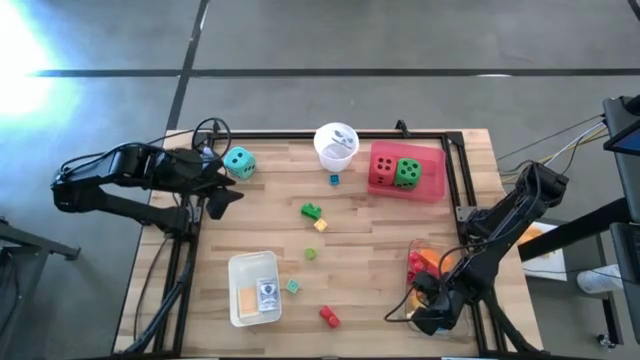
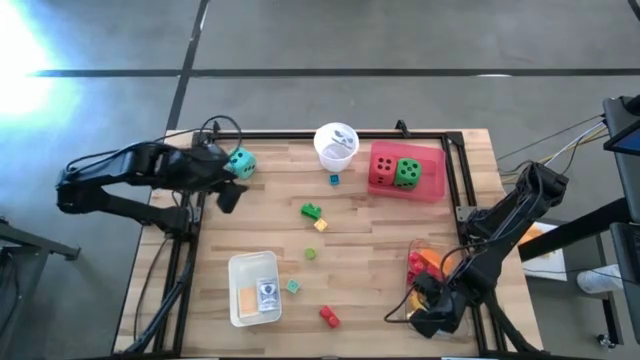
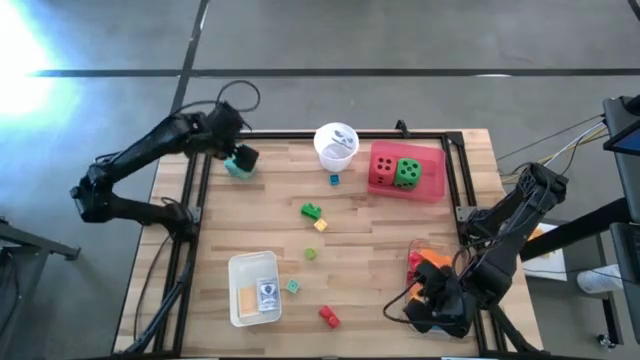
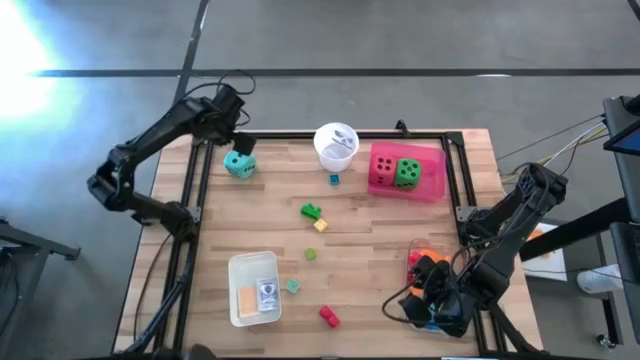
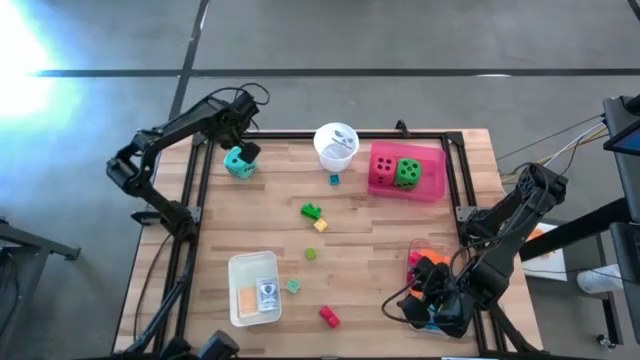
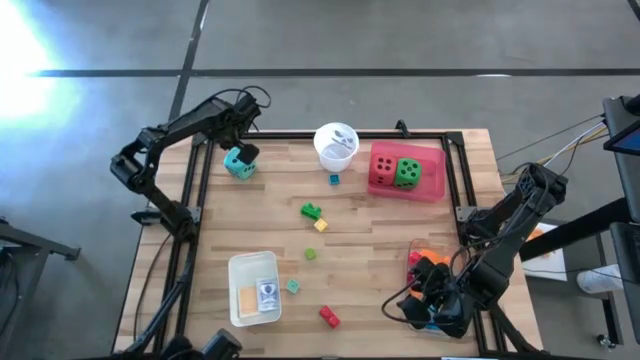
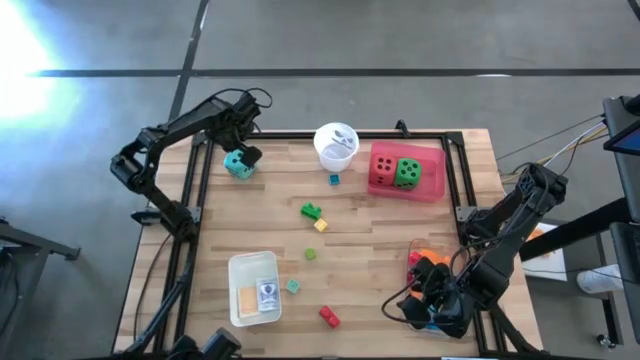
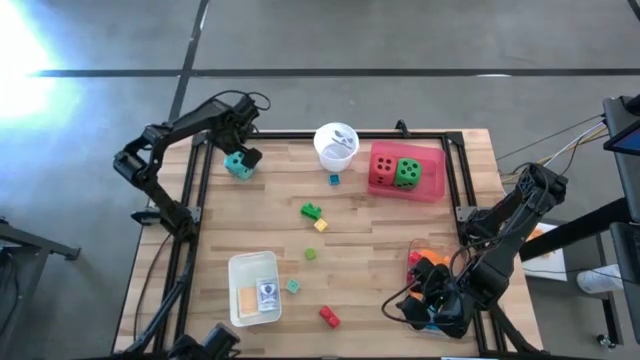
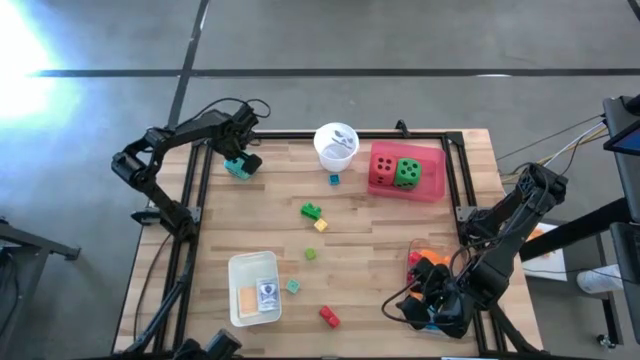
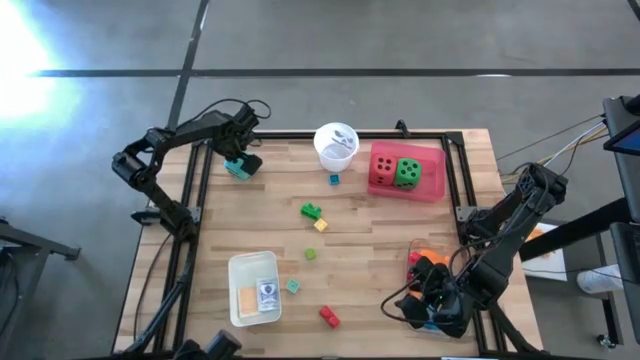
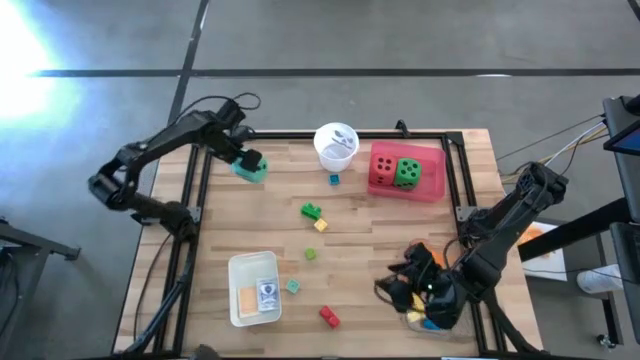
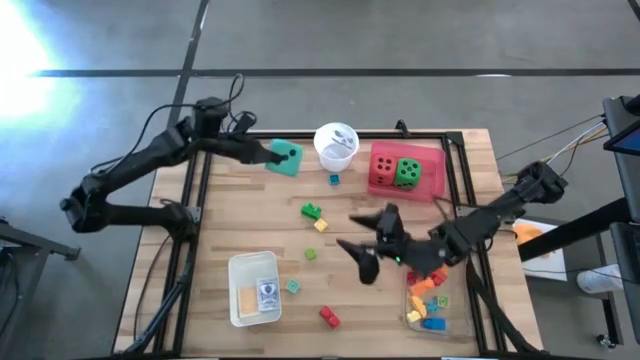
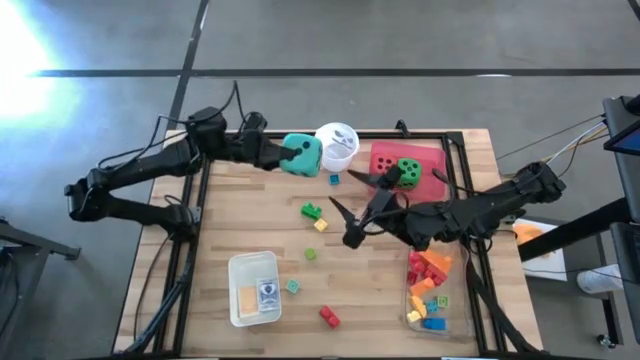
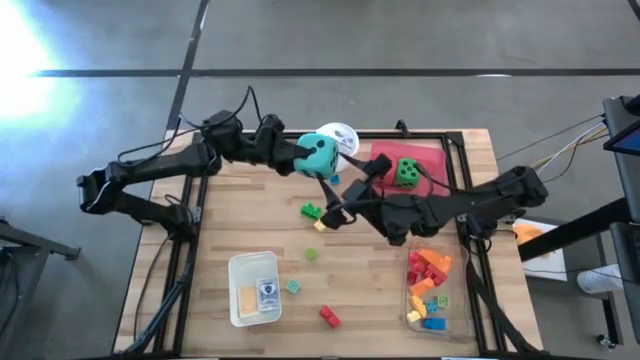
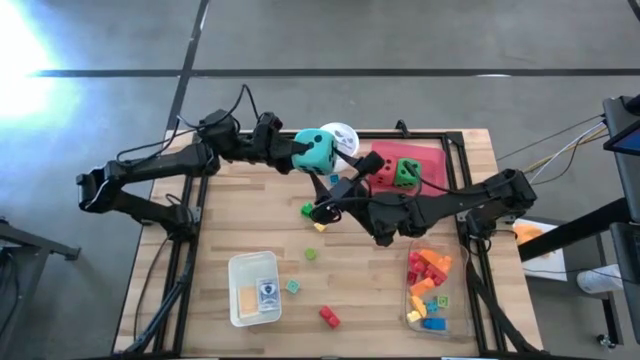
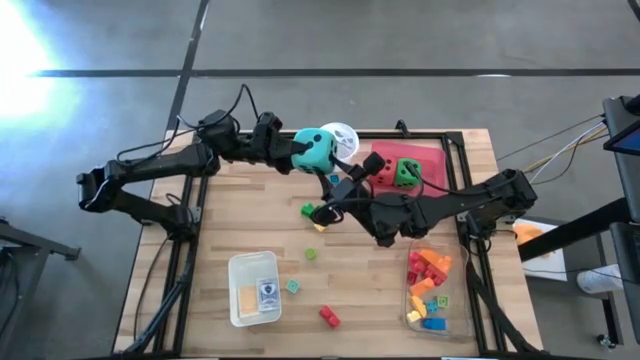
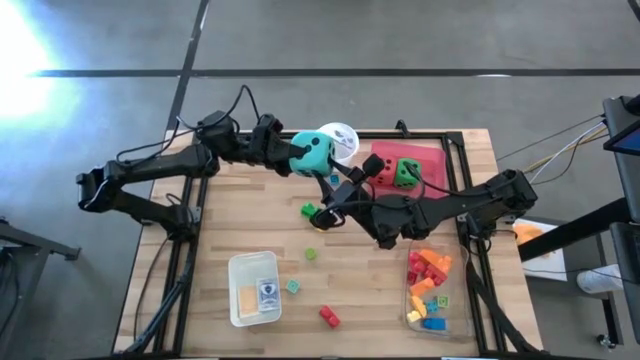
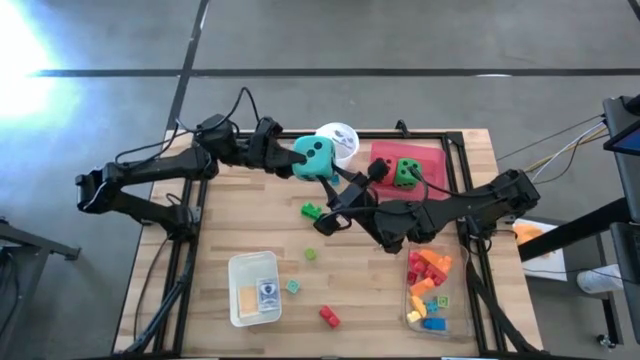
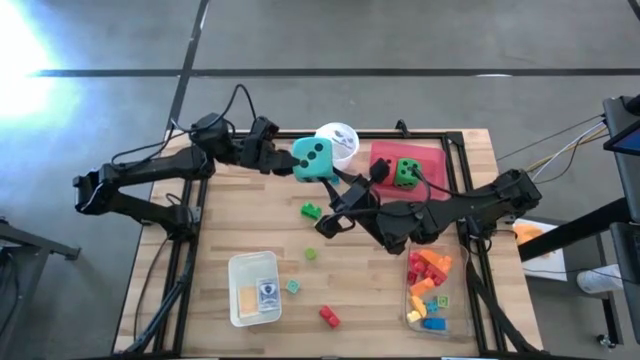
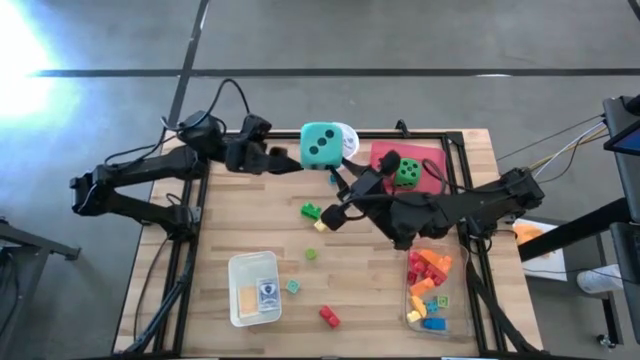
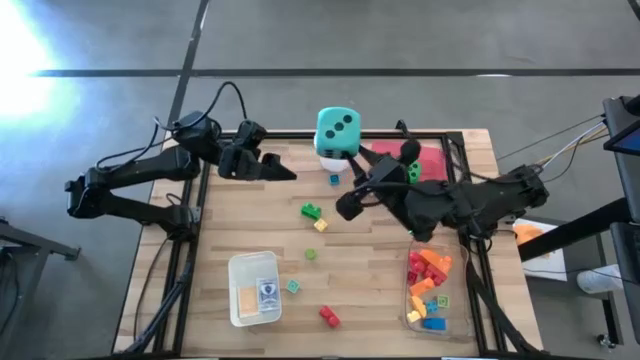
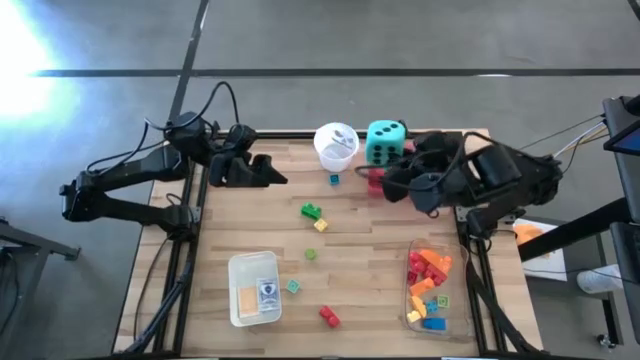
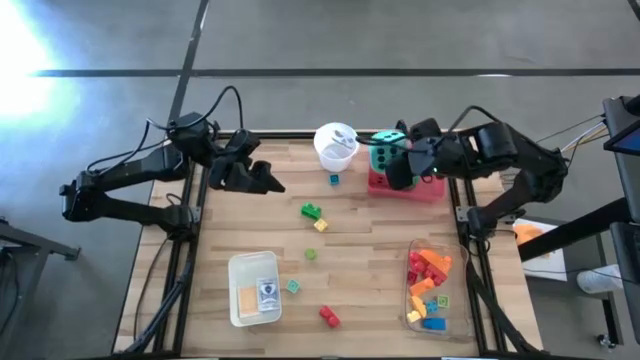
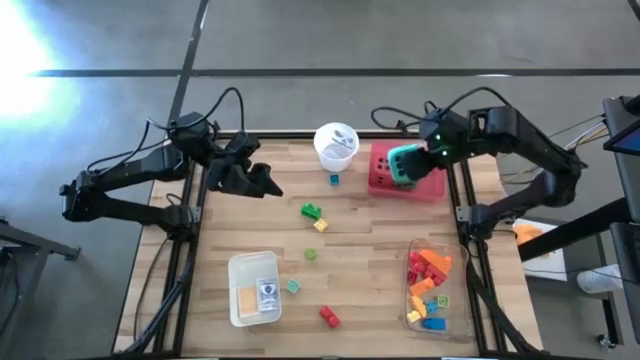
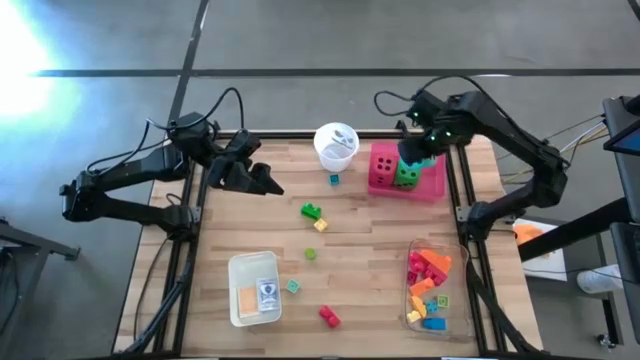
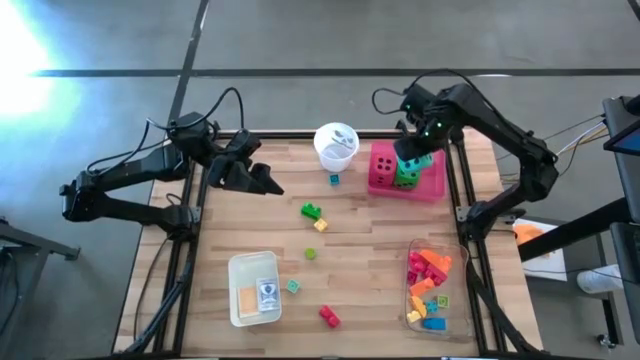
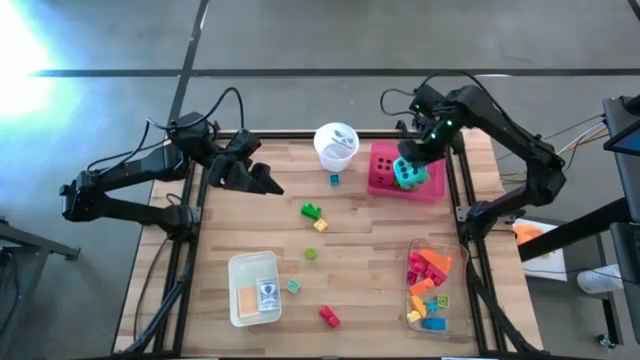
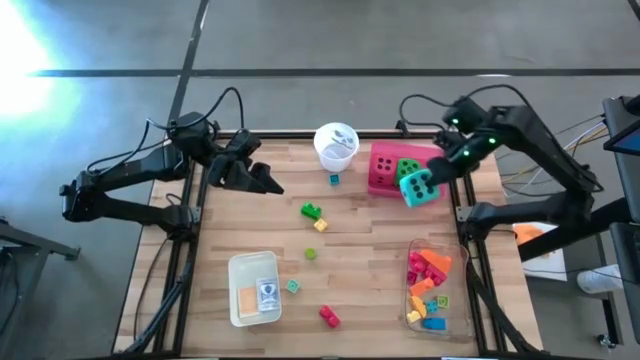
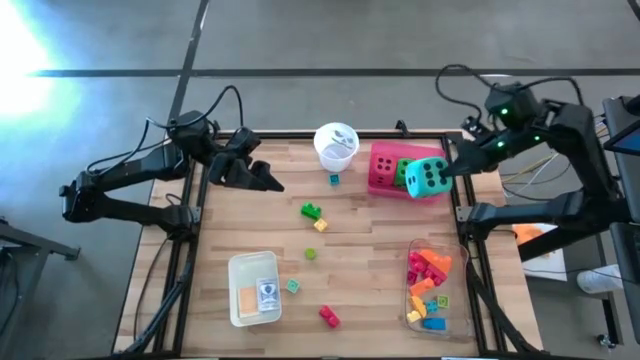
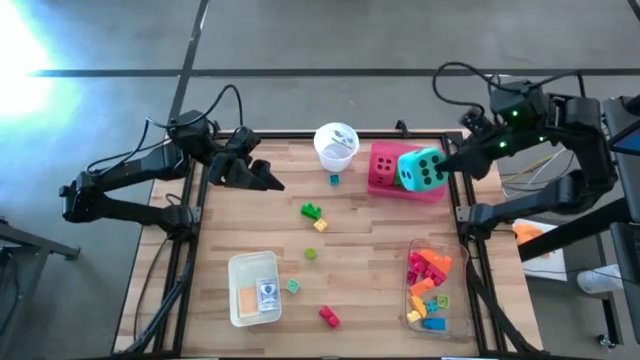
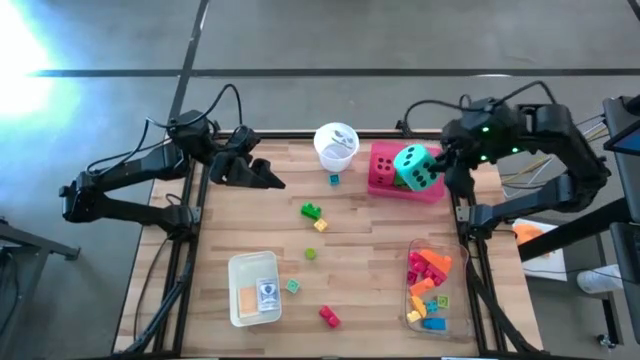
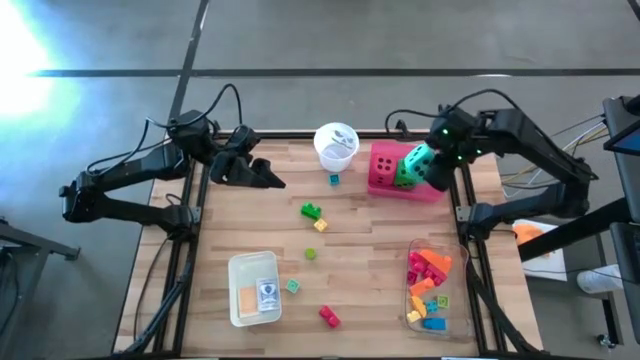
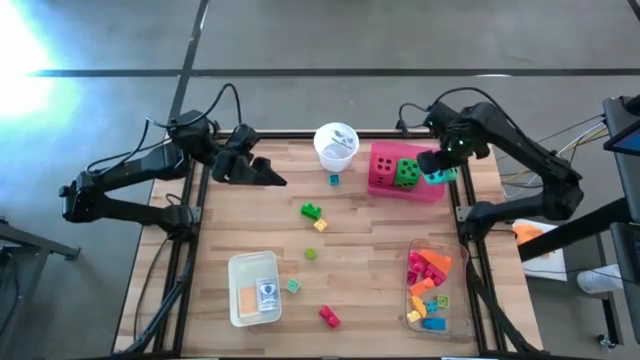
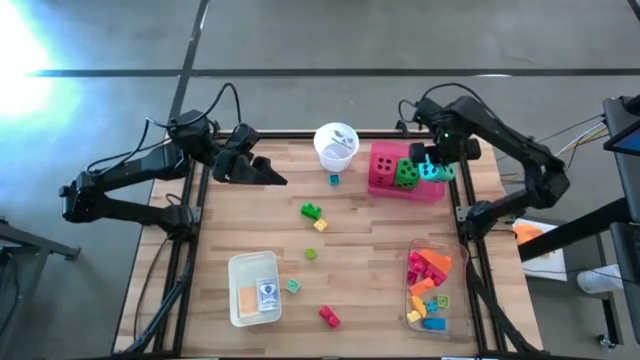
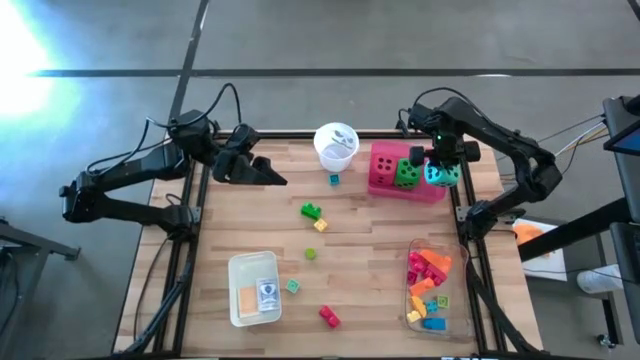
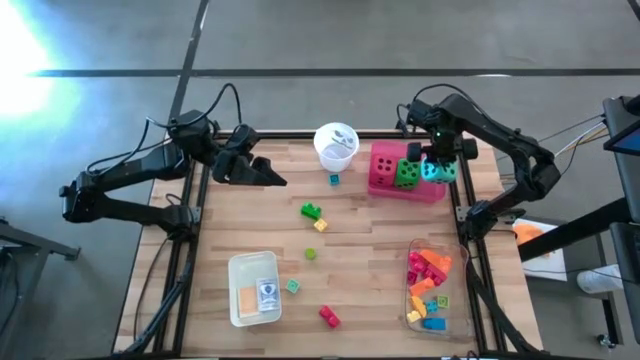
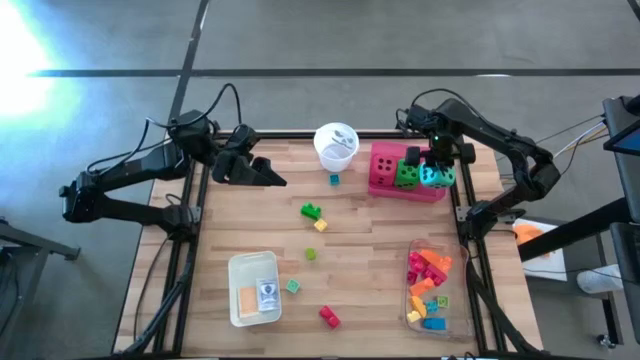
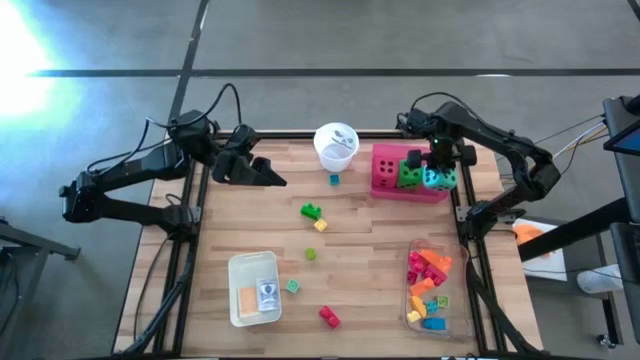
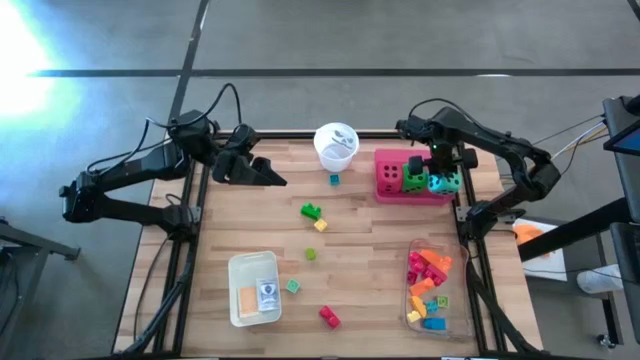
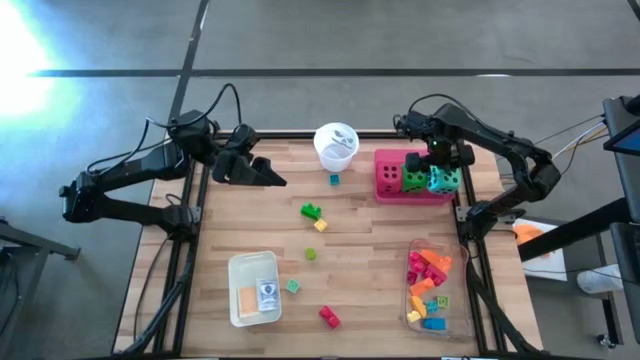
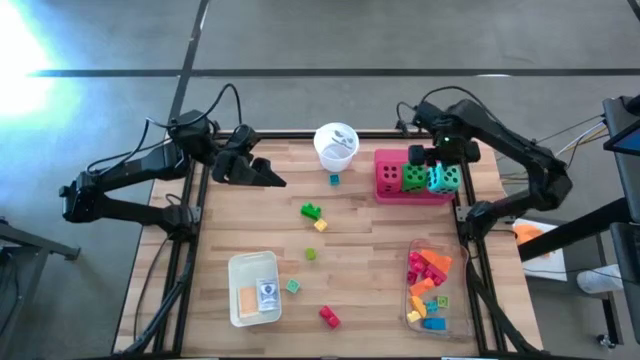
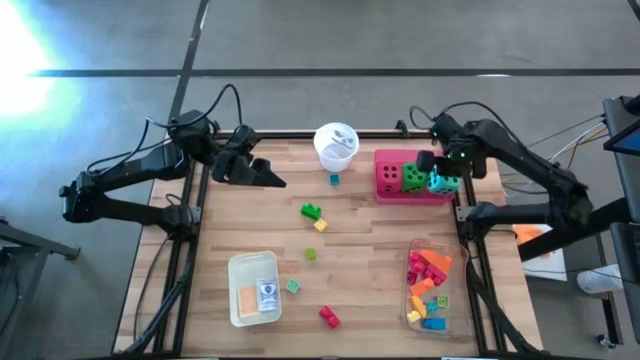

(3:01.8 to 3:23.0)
Task: Pick & Place Toys
Put the blue dice into the red bin
